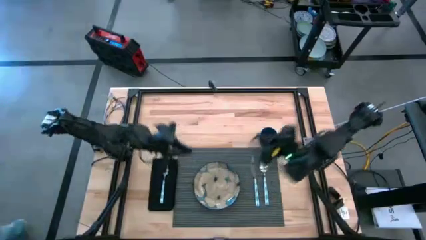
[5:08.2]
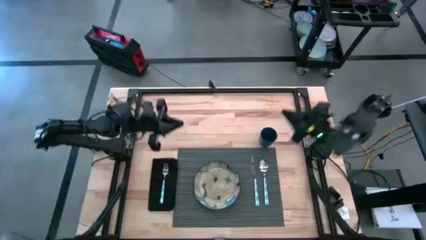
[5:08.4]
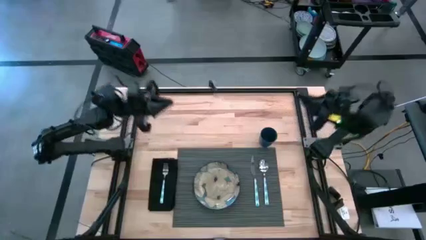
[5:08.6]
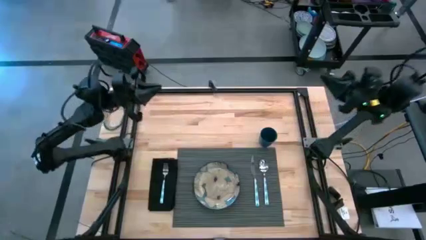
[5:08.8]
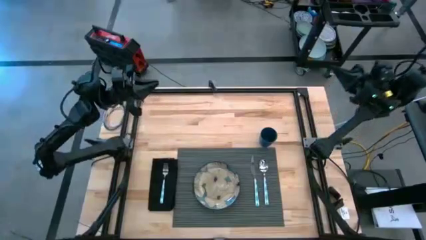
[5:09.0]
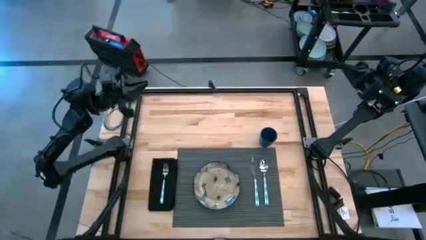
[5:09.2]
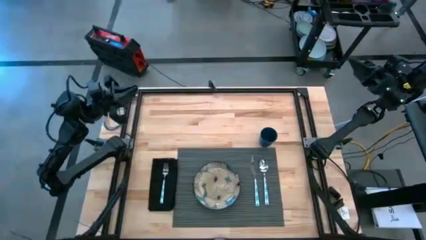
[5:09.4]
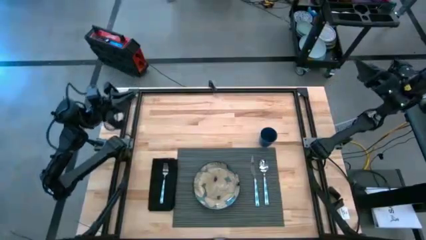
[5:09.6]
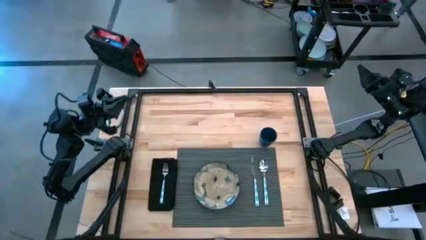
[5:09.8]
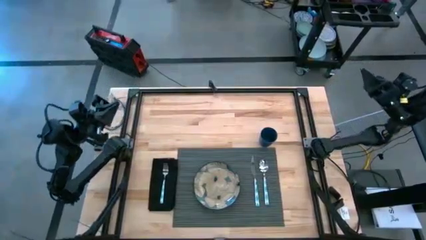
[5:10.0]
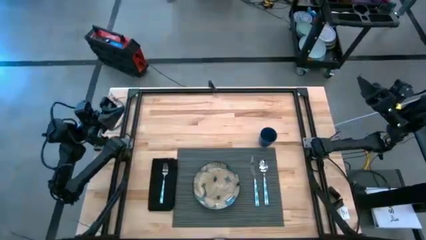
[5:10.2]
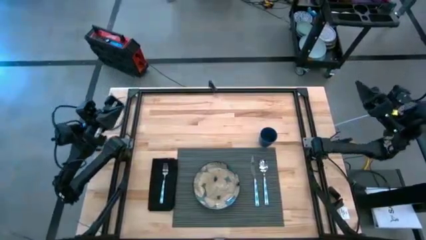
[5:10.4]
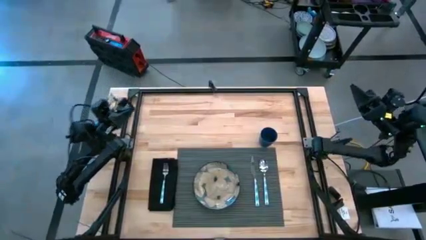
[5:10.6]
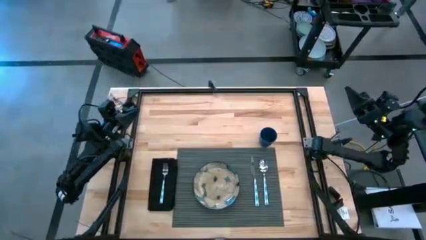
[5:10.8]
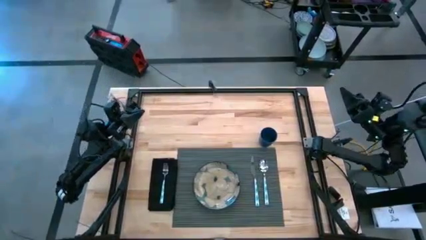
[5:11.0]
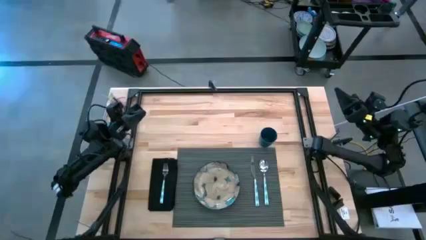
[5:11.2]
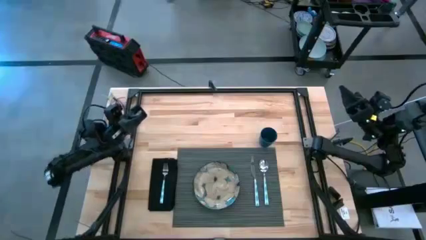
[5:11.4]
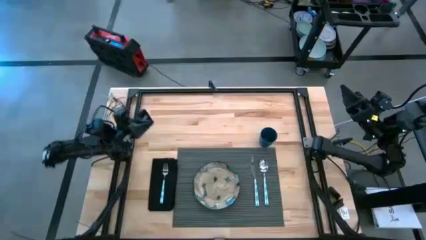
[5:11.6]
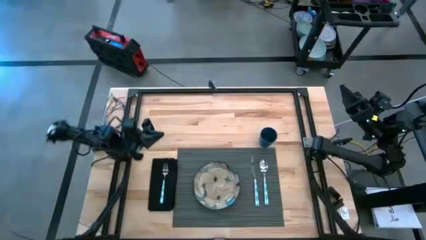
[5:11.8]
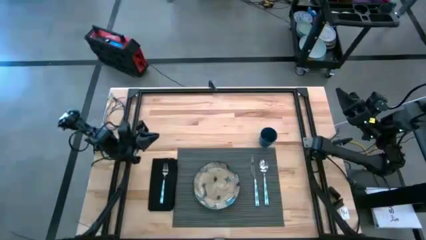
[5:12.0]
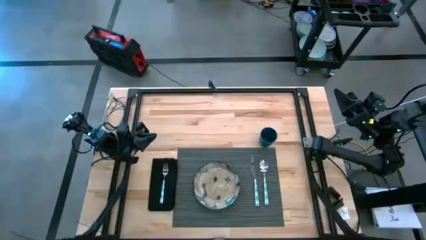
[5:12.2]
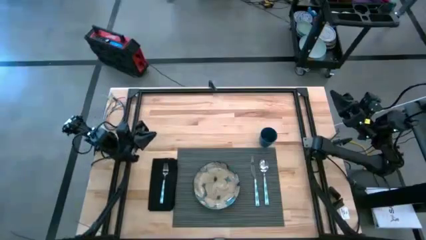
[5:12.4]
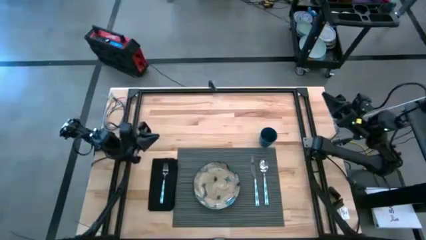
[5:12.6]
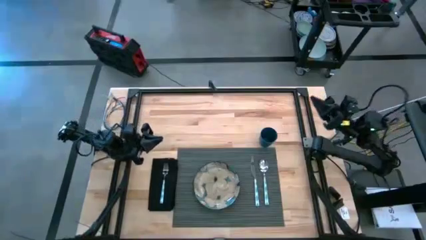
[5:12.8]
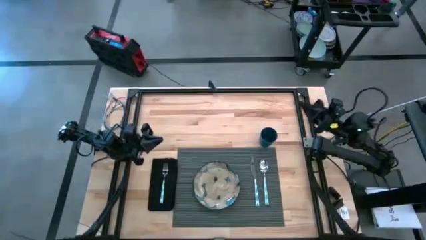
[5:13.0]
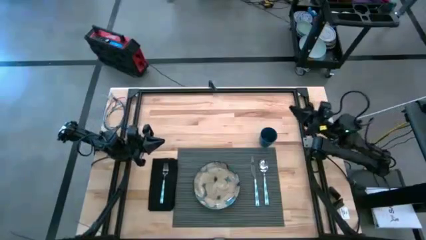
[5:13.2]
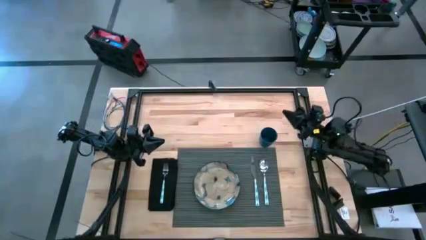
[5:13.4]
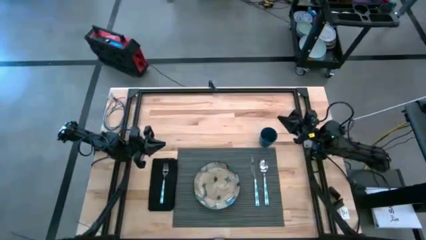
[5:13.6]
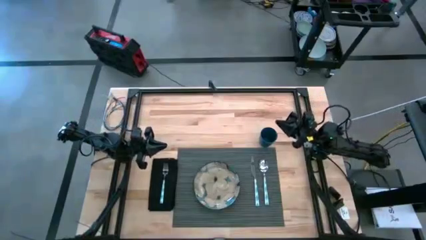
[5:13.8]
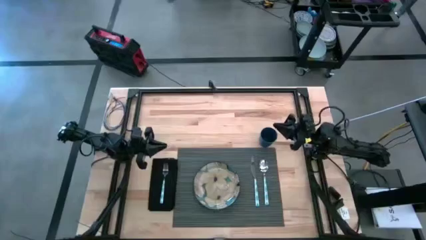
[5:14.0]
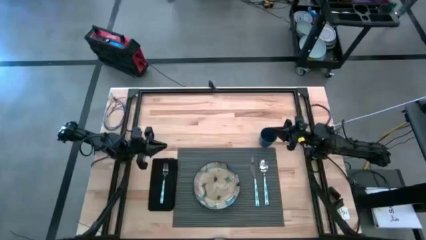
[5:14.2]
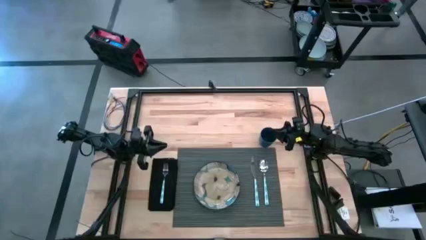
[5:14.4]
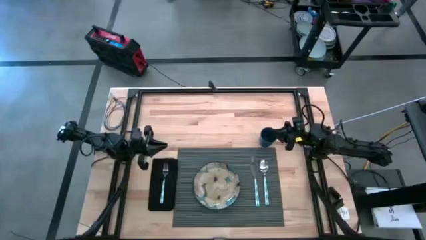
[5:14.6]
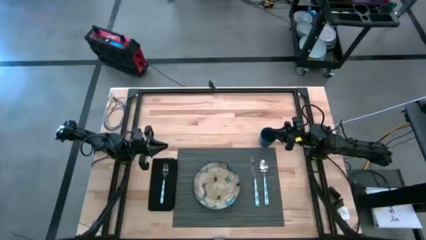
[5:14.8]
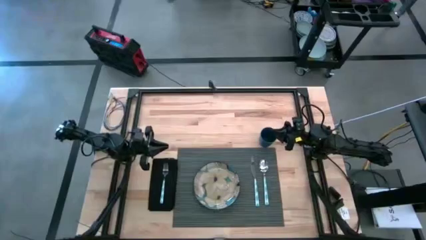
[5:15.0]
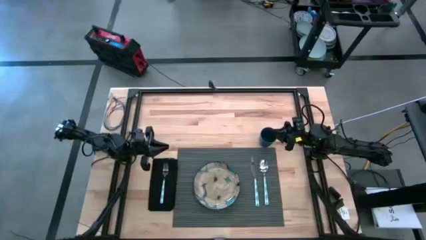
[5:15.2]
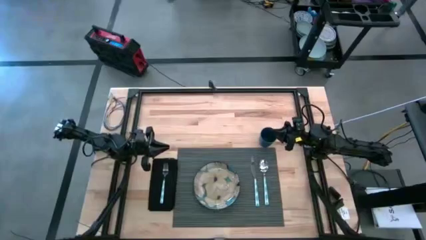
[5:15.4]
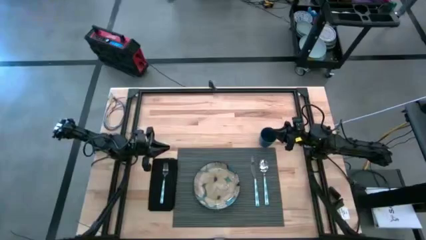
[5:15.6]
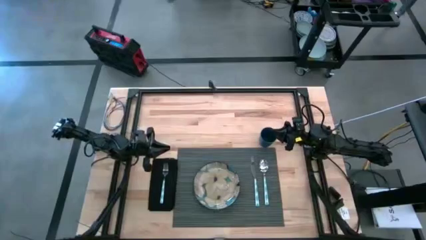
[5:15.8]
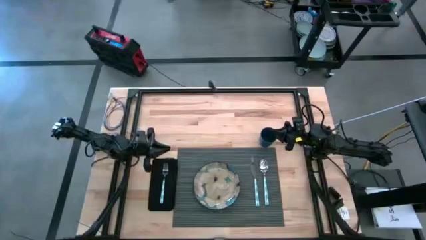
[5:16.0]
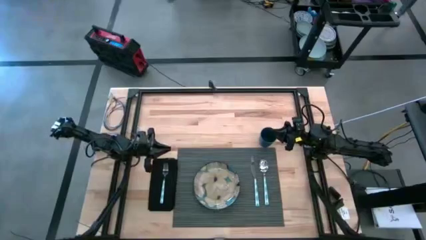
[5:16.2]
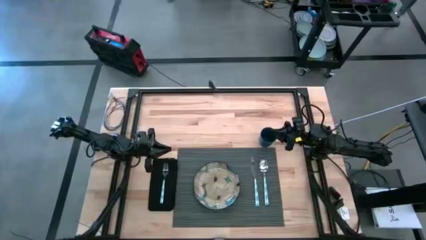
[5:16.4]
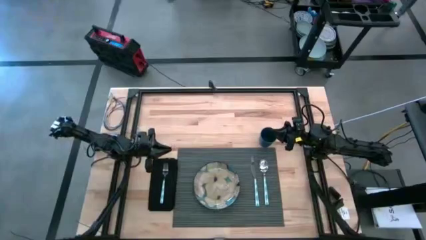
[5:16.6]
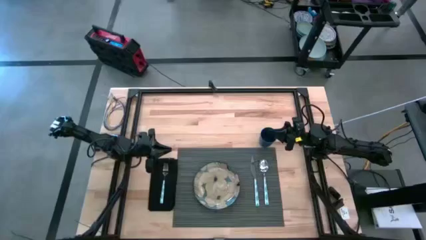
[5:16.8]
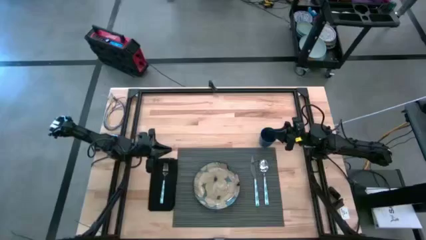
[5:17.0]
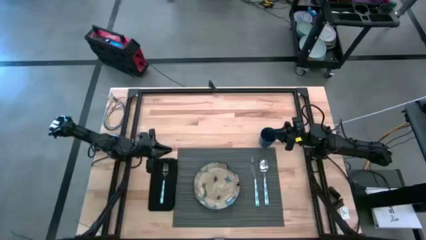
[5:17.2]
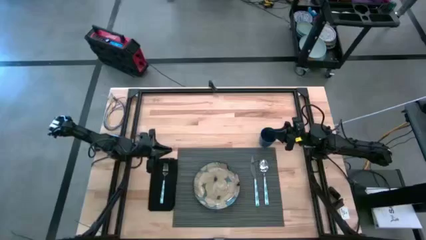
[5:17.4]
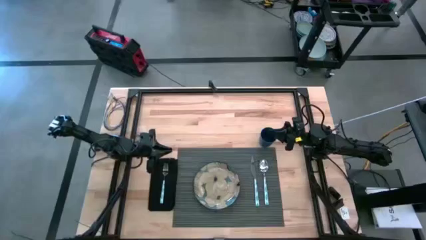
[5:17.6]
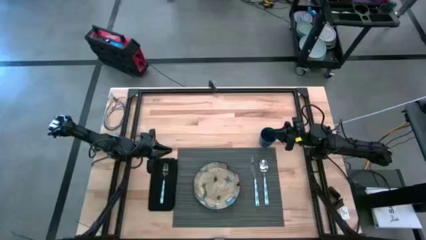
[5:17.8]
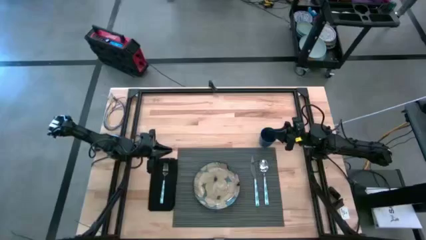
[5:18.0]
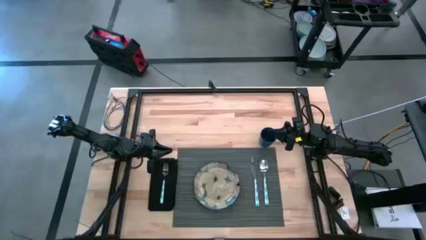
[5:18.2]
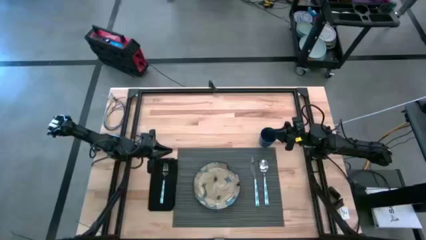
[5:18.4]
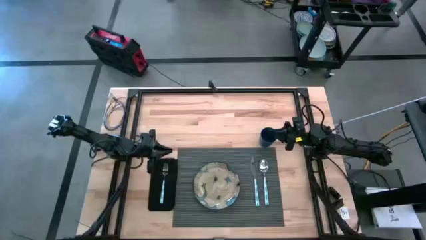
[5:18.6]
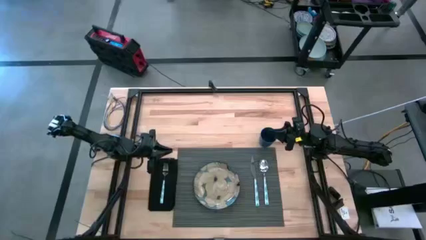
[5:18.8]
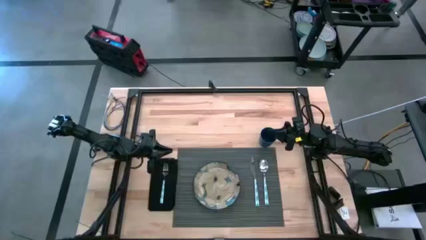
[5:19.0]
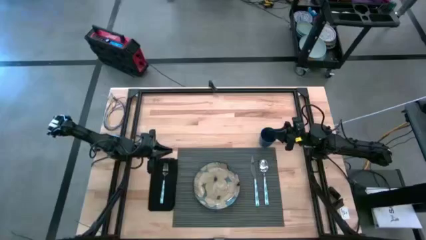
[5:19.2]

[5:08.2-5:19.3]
Task: Set table place
Return to Home Position

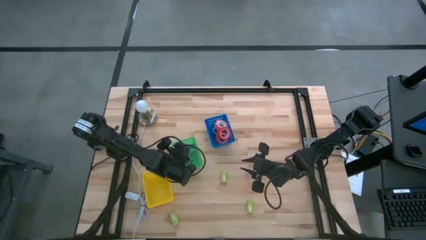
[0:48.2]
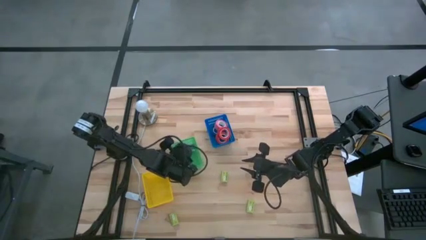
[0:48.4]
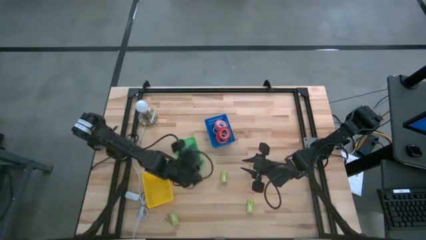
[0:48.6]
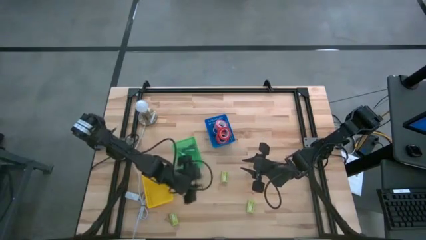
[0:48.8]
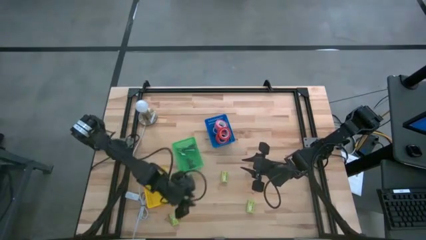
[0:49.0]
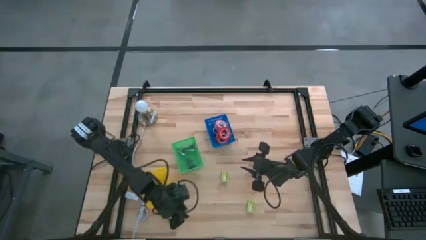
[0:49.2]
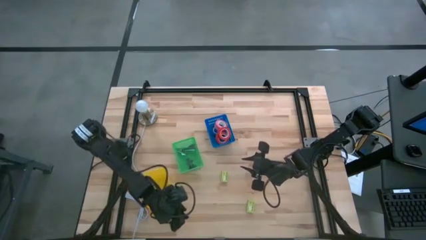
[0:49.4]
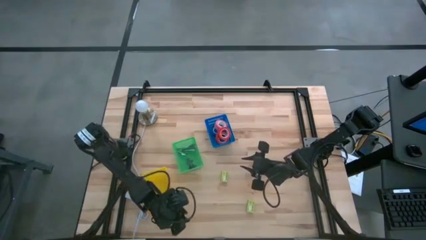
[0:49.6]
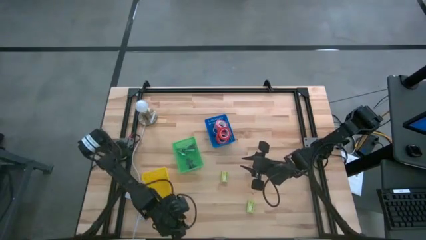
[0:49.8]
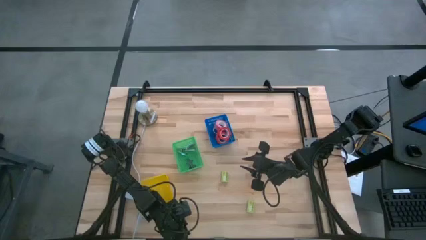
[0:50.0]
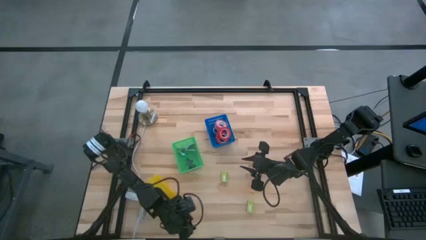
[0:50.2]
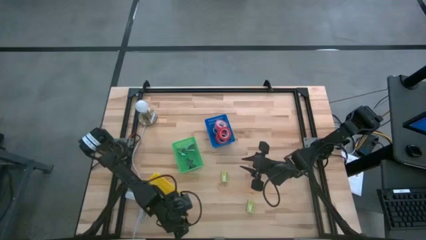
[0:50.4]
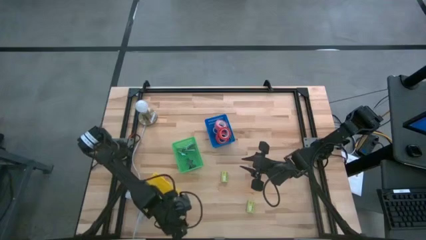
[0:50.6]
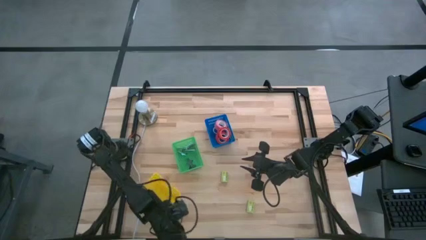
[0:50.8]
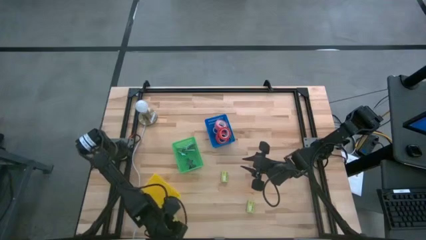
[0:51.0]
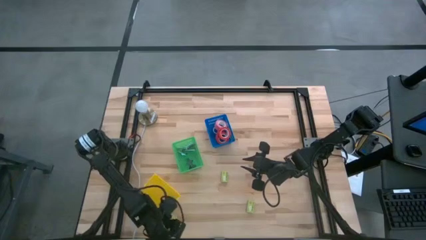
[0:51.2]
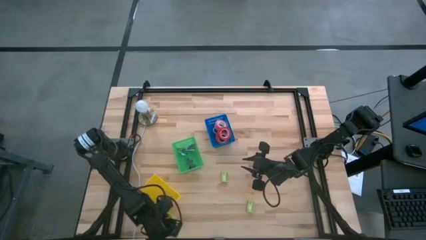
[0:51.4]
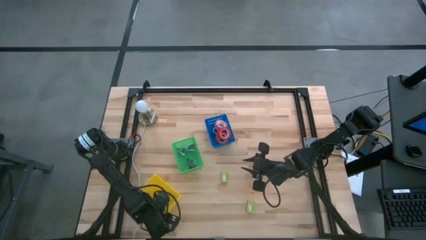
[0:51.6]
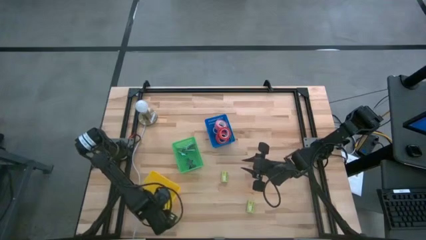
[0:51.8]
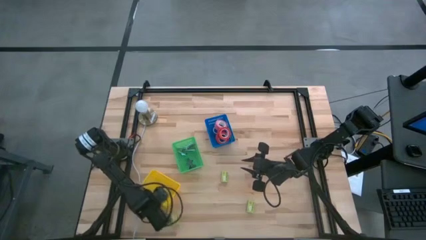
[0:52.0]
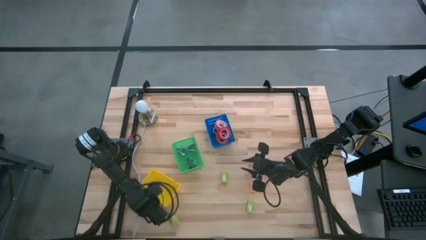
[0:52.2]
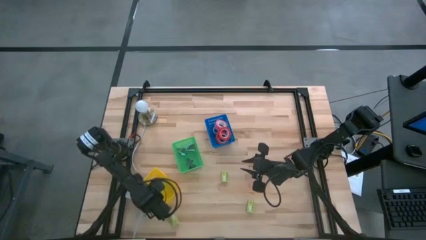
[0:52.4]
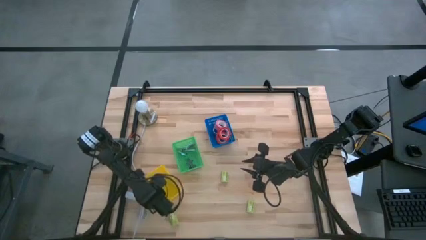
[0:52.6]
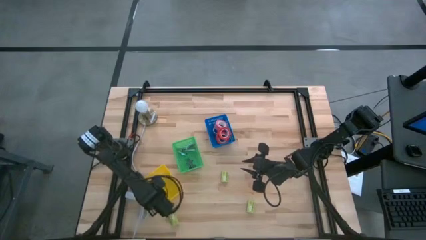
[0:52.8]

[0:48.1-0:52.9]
Task: Pick and place Stapler, Stapler remover, tape
Adjust the yellow basket on the table
